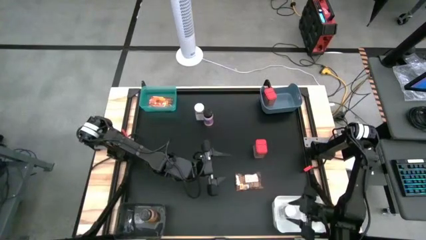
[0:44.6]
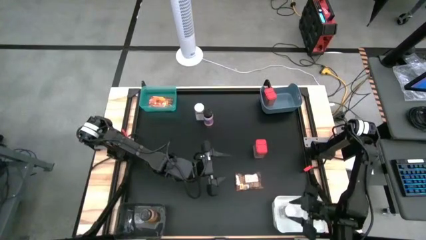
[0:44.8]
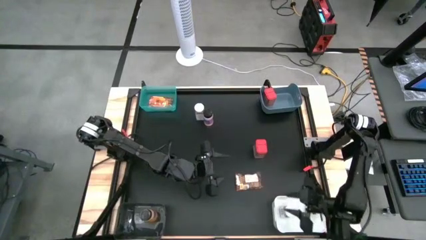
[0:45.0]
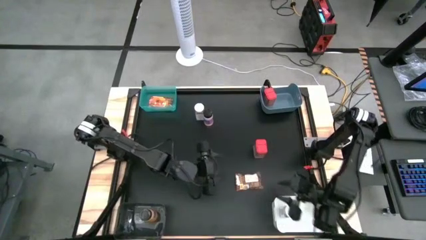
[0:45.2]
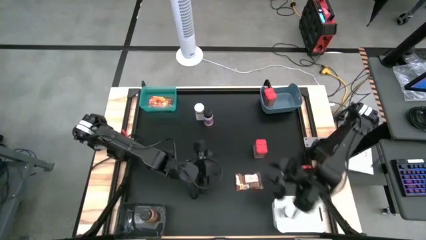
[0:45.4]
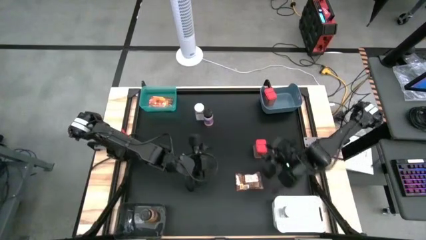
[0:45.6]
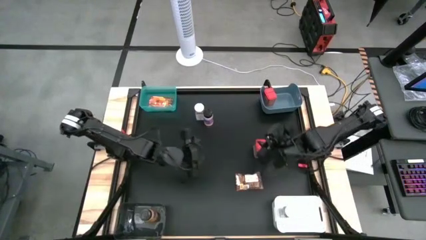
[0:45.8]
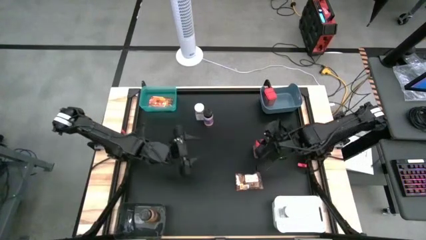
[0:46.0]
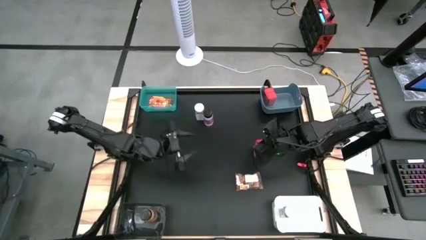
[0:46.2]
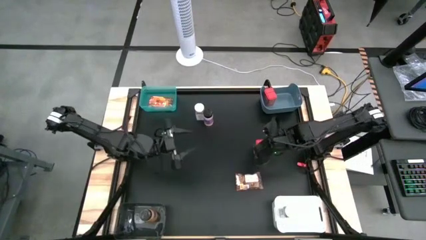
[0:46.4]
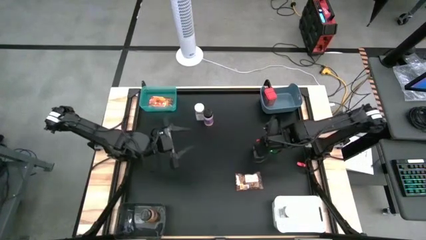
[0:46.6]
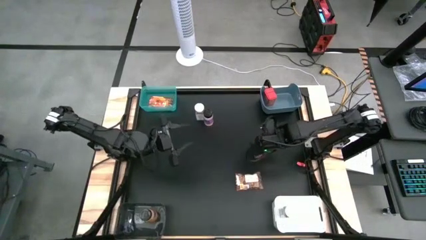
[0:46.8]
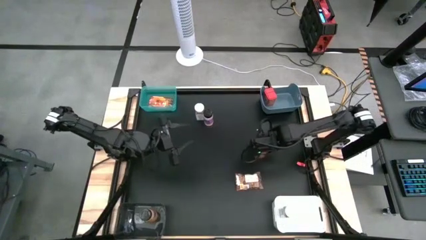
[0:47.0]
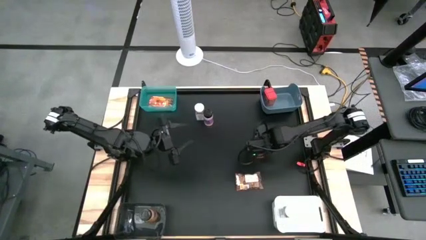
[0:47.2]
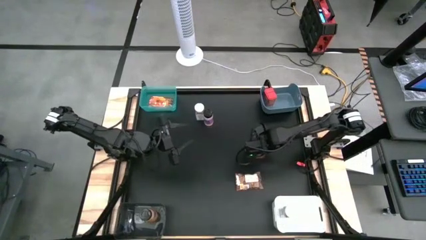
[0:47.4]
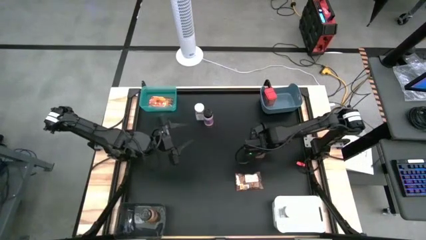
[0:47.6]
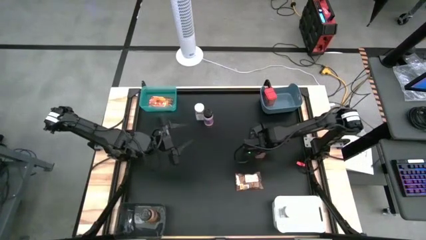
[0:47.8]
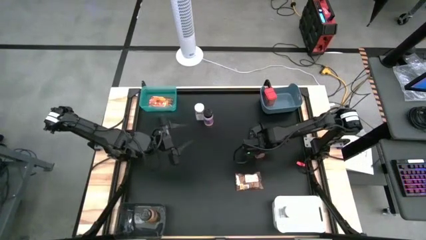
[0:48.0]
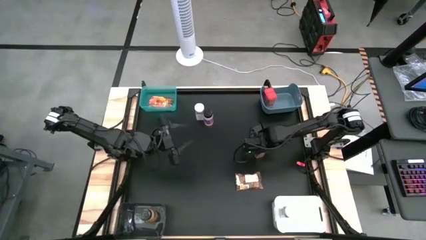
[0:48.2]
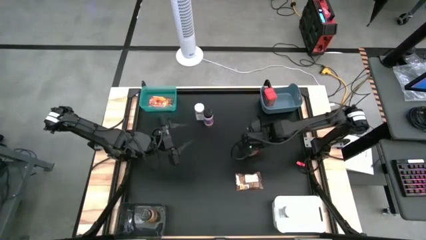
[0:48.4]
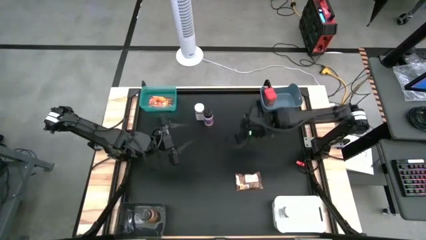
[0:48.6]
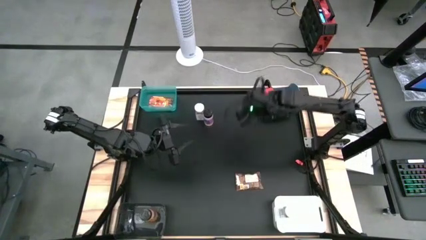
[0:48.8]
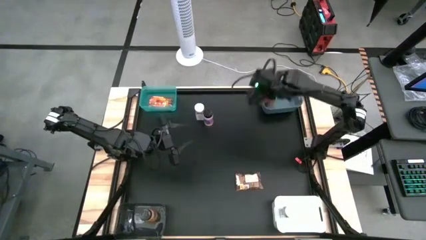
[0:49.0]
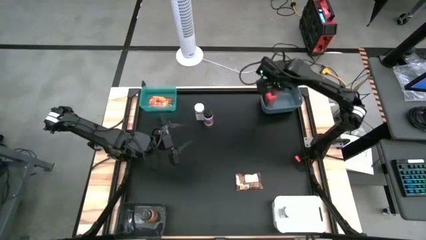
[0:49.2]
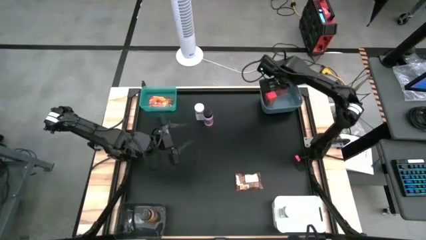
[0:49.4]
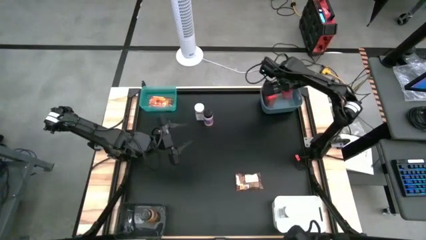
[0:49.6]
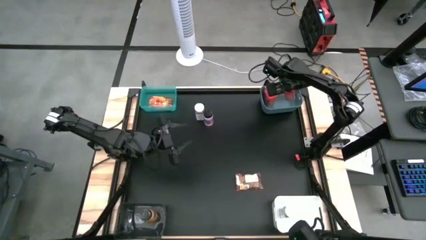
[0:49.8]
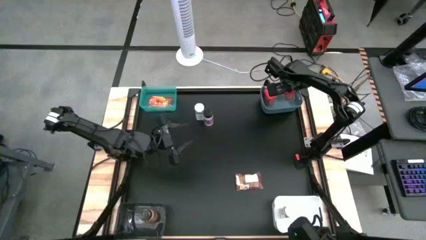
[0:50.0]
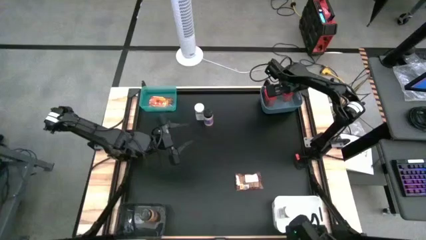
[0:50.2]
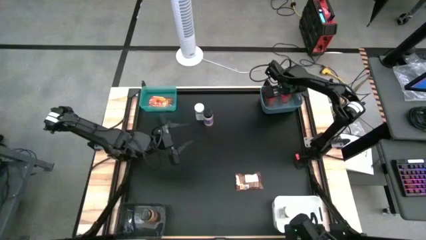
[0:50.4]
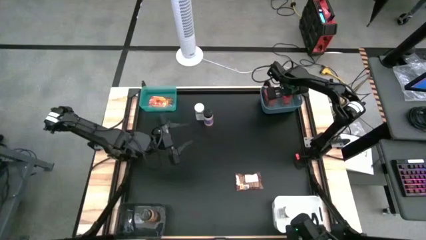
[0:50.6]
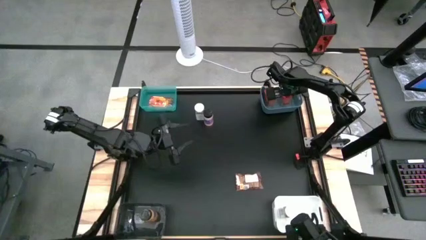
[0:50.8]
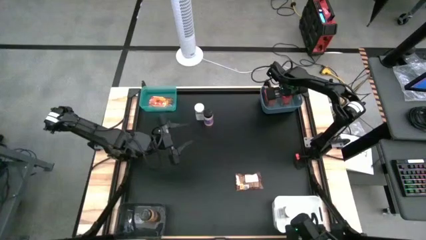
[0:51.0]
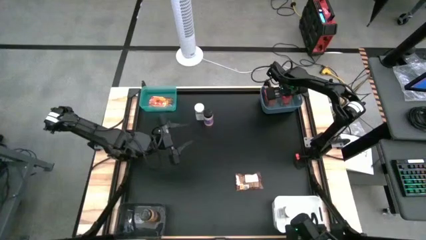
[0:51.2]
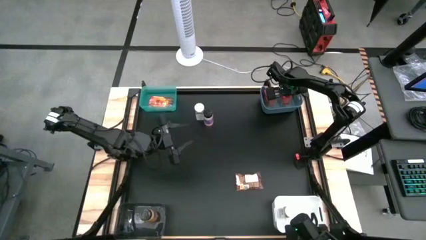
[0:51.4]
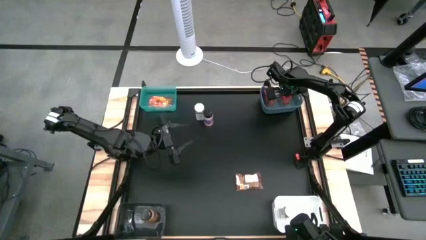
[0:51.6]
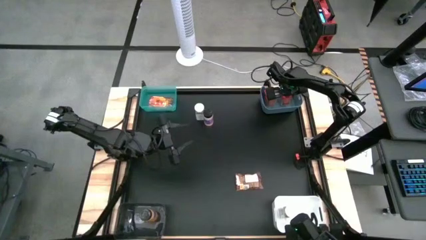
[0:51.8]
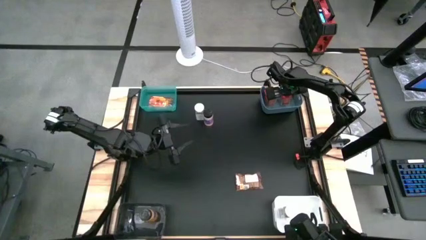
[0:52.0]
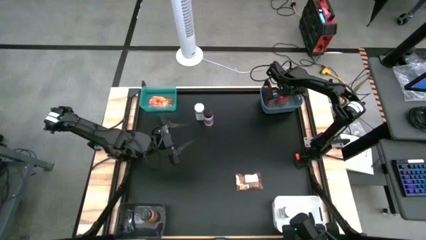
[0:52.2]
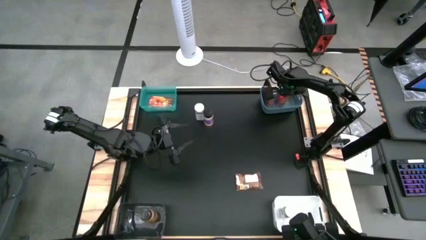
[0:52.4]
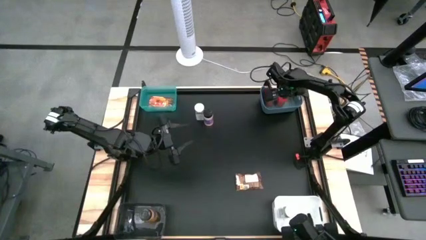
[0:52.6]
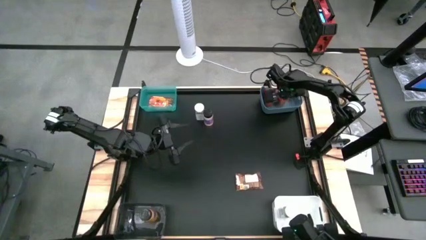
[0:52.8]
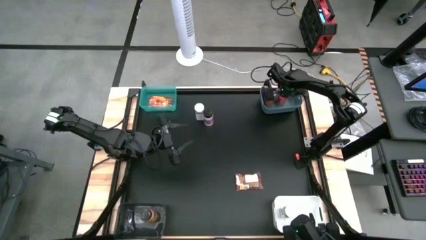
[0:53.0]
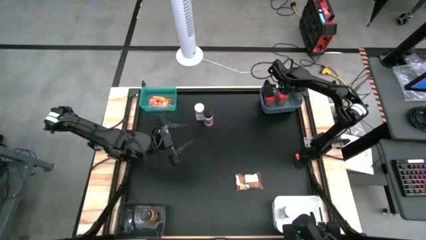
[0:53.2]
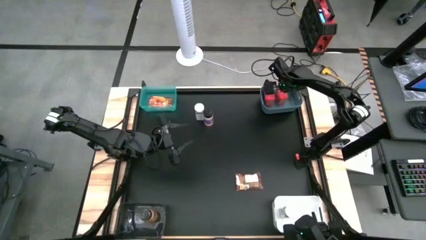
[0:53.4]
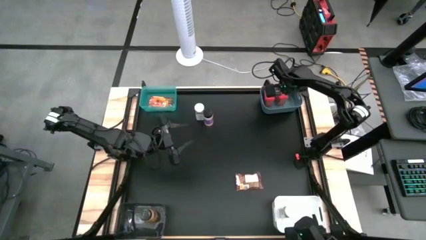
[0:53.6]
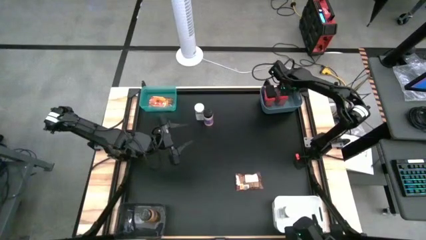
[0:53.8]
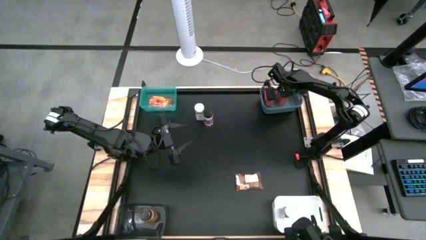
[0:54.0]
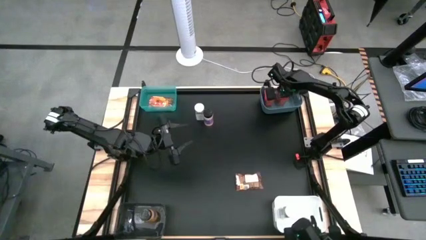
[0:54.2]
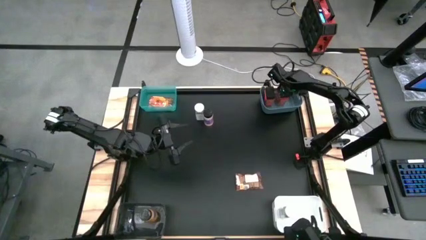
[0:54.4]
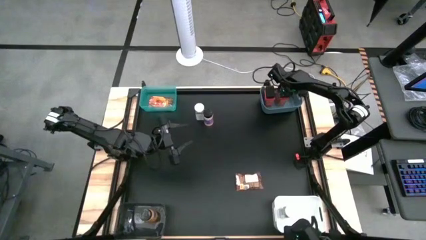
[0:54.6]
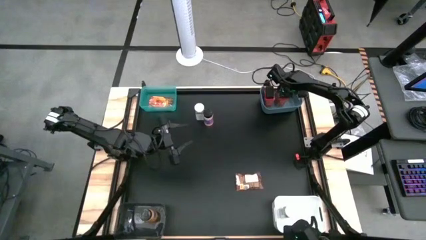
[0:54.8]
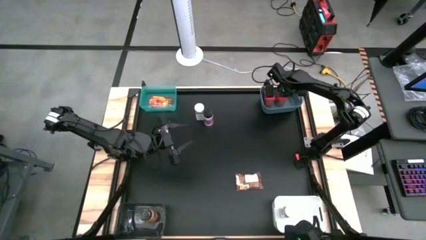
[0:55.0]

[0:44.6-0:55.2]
Task: Sort spices by type
Put the red seasoning can into the dark blue bin

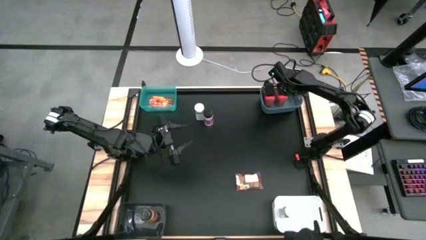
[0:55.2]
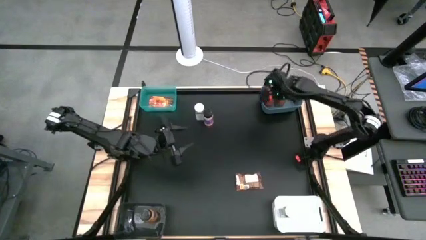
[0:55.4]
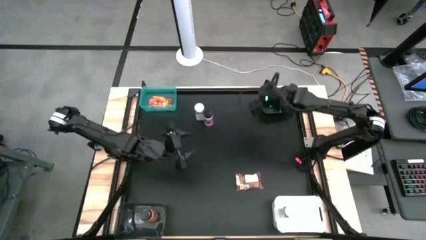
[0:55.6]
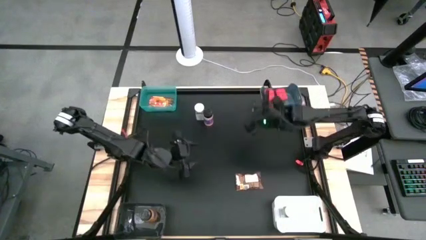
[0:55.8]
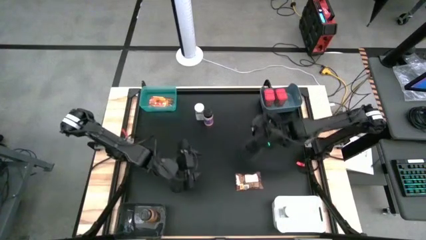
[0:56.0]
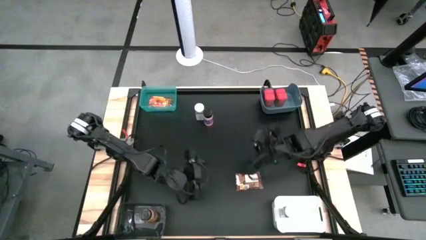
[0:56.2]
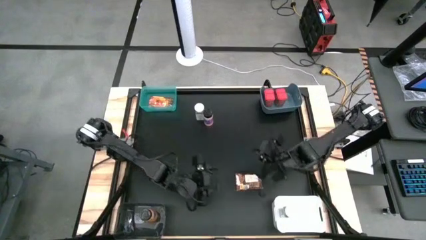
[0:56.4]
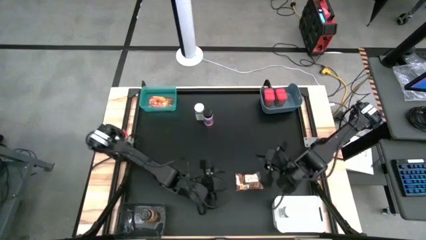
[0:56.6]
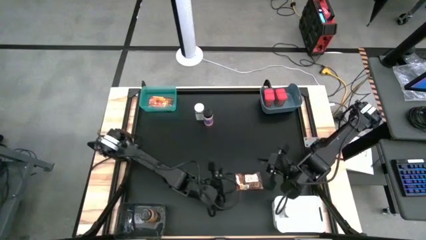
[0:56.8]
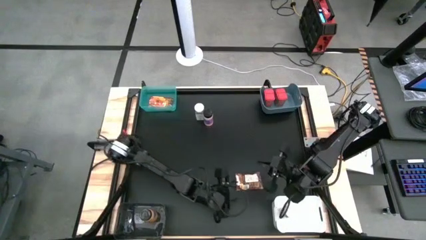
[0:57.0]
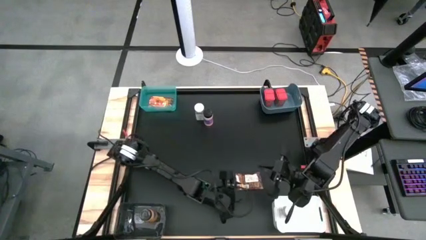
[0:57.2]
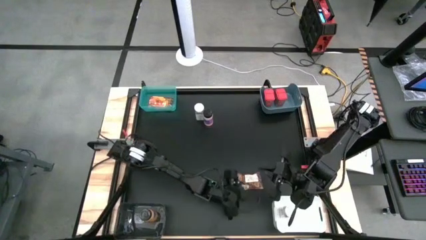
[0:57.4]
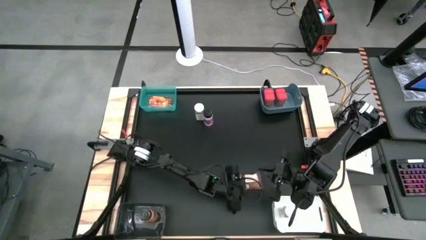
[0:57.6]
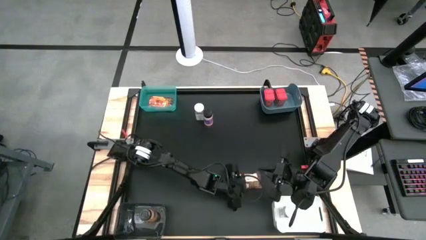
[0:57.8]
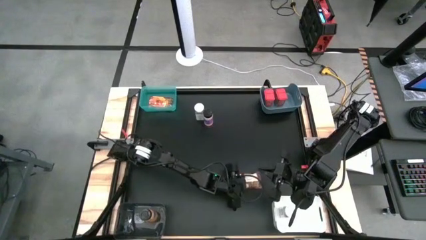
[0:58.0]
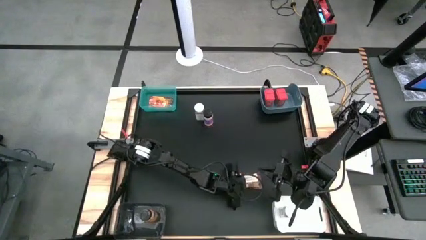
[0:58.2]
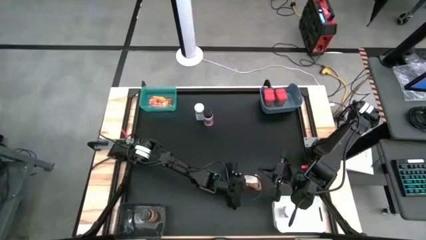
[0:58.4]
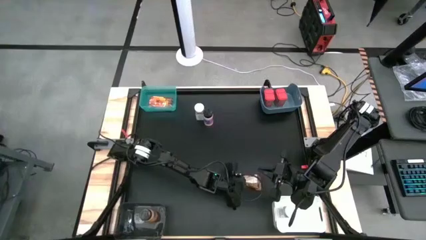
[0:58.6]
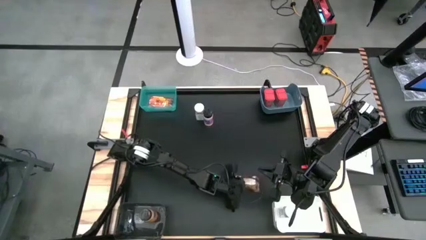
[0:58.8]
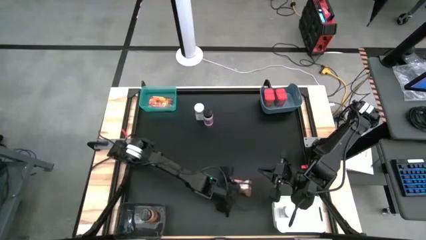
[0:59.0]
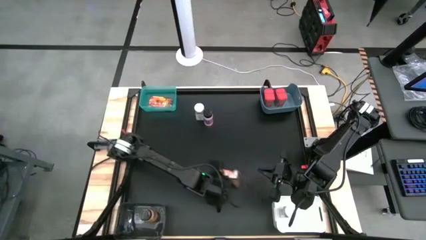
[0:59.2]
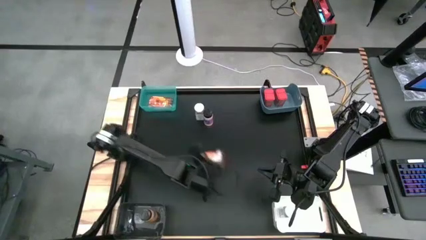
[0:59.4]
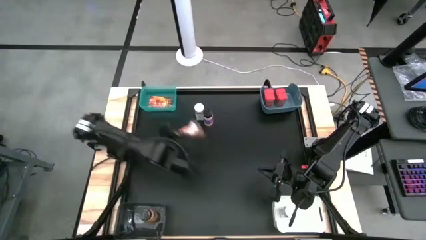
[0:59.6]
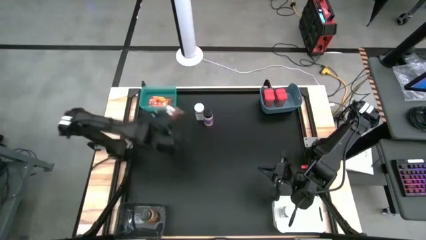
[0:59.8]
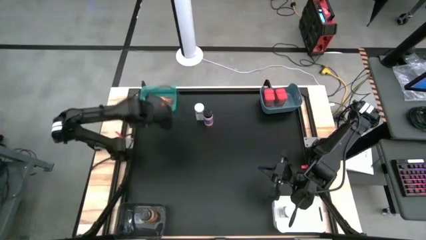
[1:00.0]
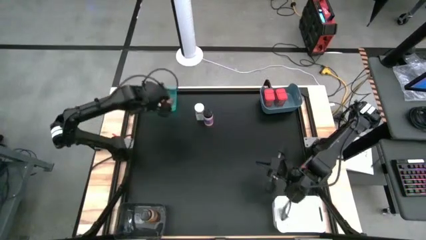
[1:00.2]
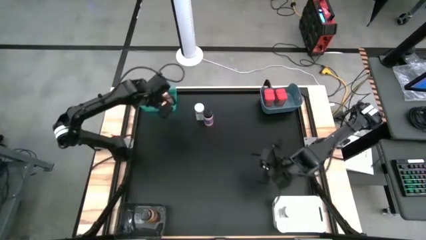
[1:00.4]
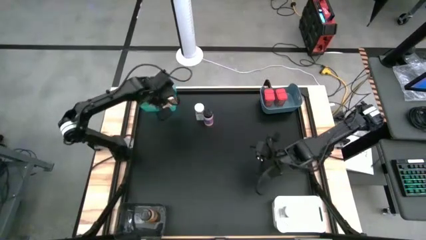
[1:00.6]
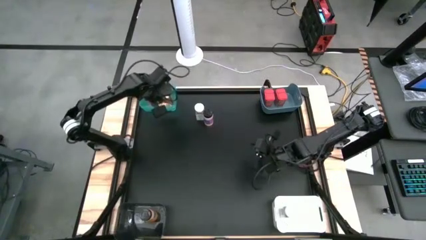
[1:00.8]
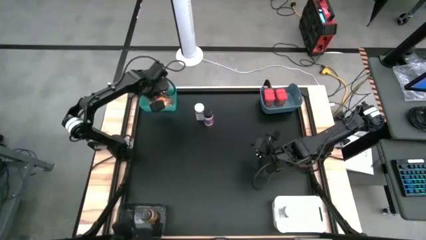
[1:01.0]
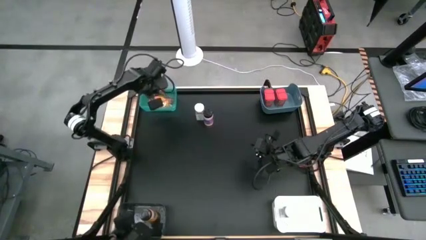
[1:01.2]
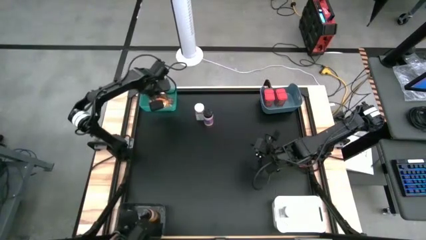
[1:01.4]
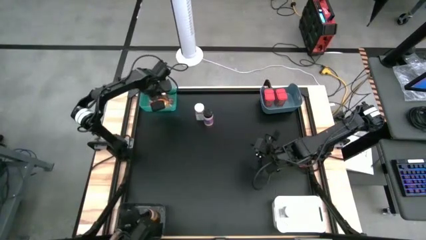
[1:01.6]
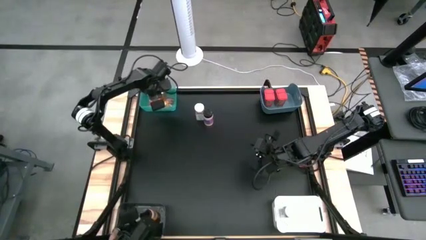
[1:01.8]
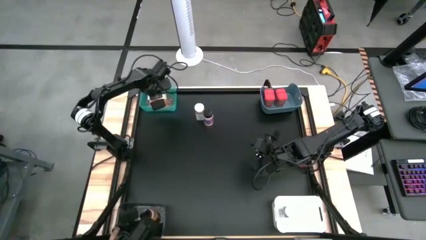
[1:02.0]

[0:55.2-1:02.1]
Put the orange seasoning pack into the light green bin
